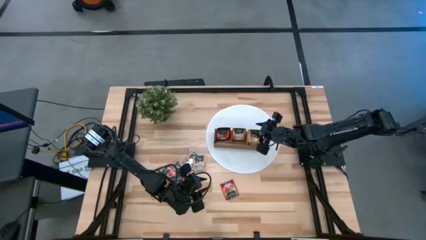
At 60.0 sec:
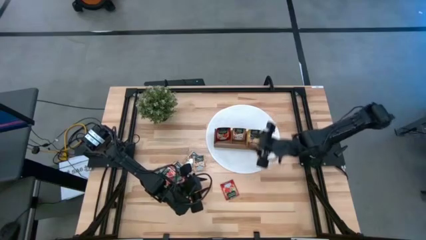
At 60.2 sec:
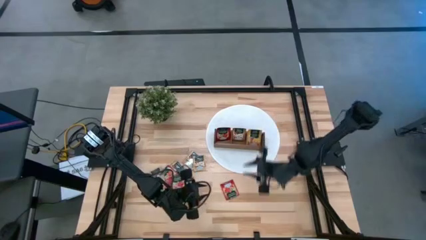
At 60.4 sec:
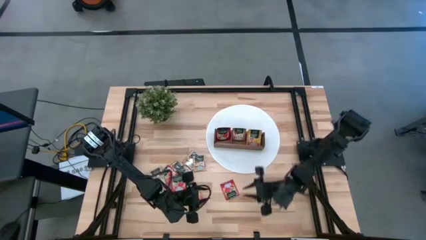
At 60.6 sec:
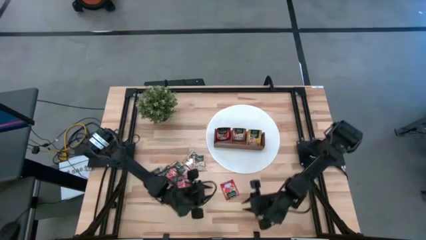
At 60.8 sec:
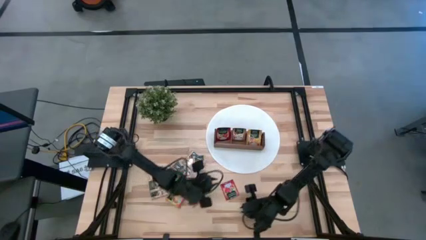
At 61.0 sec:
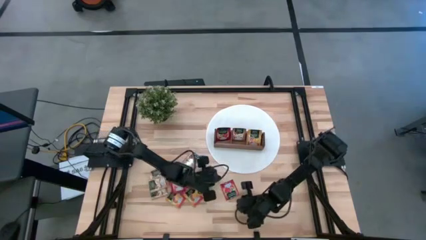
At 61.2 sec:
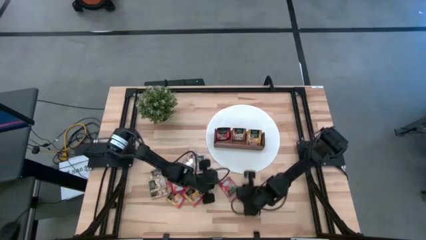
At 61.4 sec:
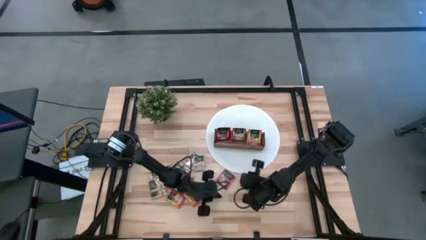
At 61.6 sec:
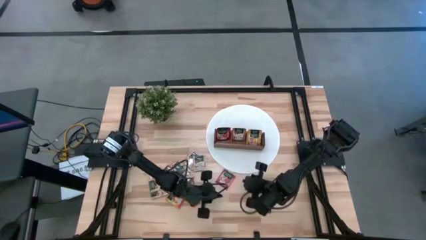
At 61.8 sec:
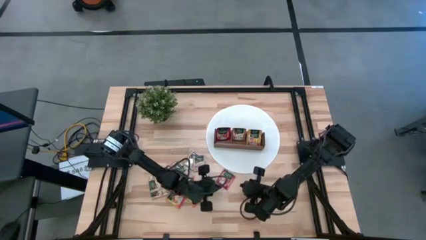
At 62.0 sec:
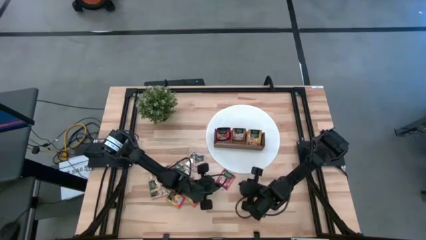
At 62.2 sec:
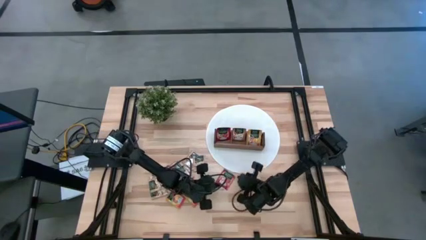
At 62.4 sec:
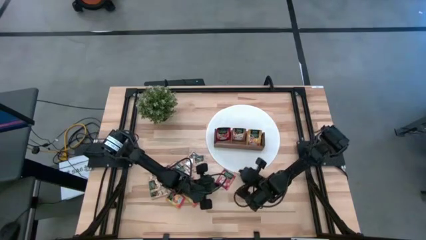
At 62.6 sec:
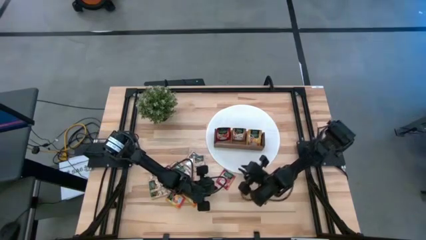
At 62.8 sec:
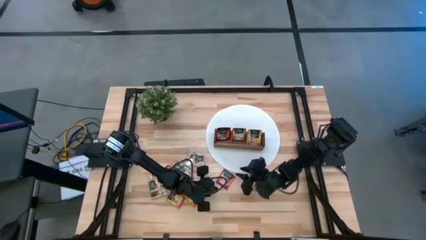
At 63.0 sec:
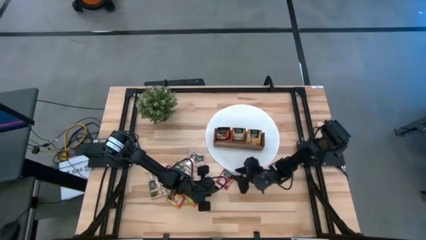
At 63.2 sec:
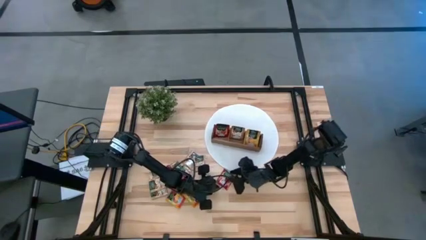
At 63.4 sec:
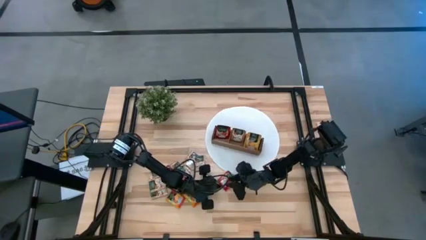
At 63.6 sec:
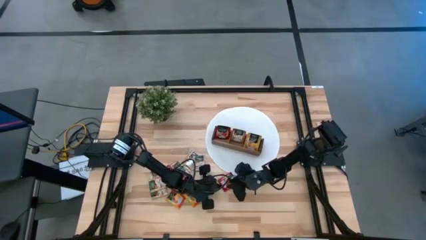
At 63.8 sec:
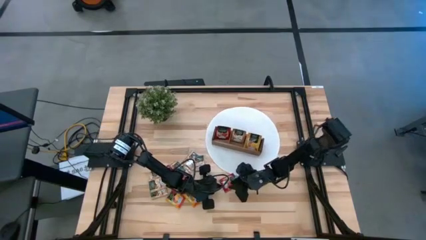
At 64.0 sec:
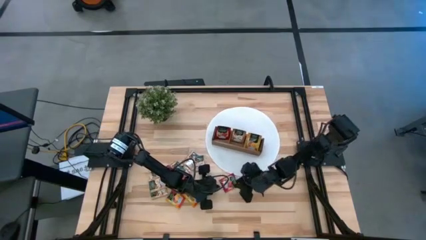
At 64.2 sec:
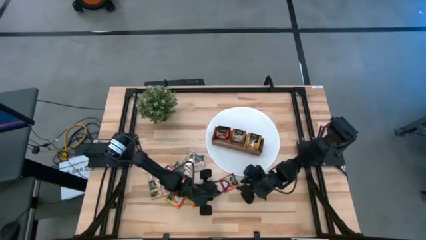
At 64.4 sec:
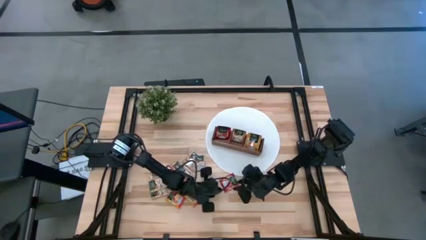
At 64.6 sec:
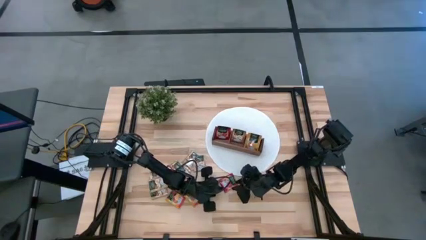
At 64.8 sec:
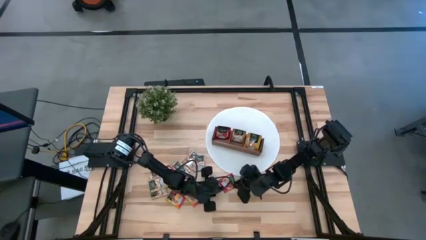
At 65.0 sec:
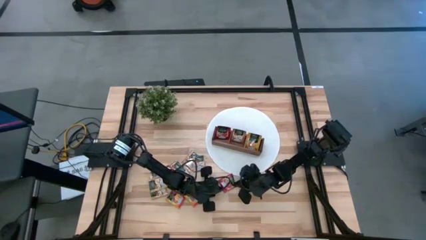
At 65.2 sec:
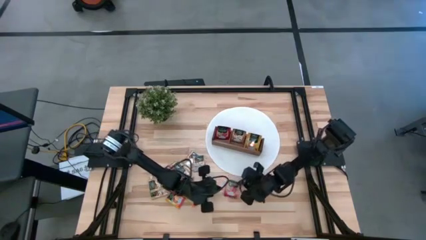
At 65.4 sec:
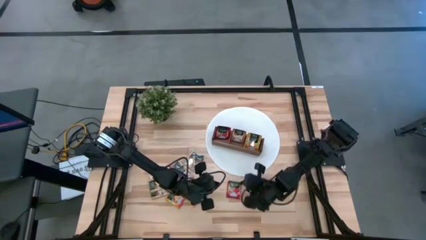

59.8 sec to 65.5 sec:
Task: Pick & Place Tea
Put the red tea bag into the left section of the wooden organizer

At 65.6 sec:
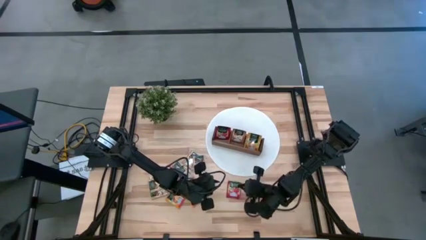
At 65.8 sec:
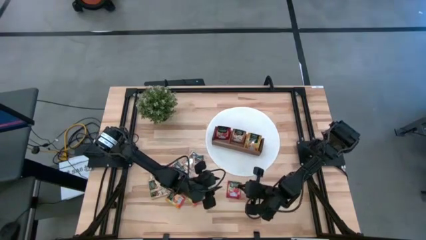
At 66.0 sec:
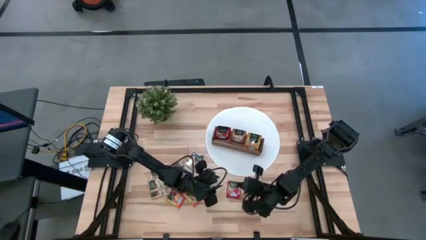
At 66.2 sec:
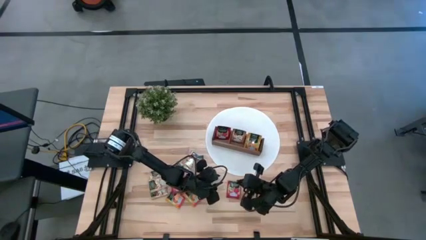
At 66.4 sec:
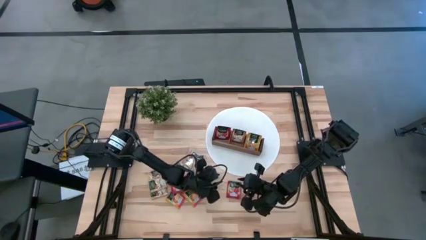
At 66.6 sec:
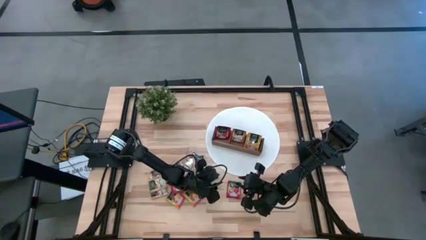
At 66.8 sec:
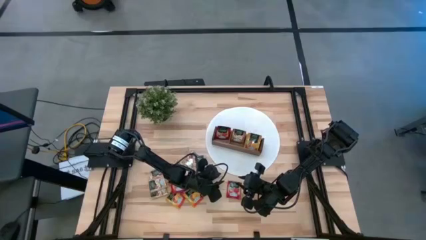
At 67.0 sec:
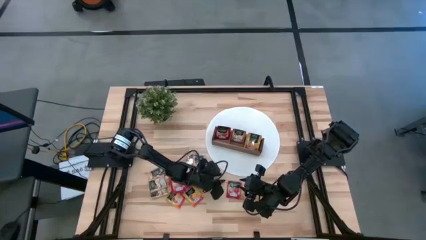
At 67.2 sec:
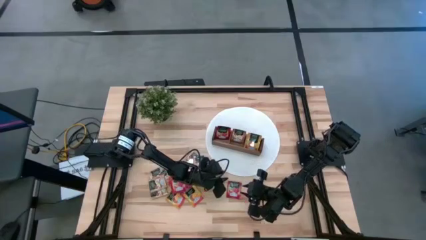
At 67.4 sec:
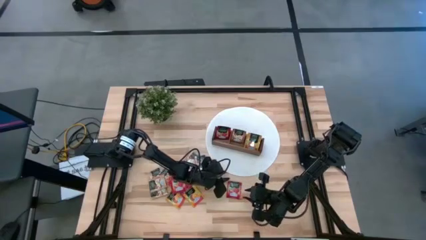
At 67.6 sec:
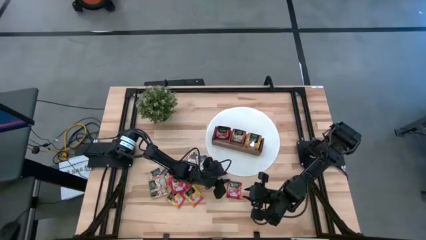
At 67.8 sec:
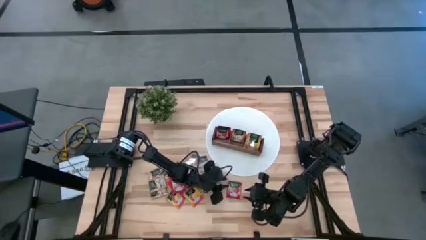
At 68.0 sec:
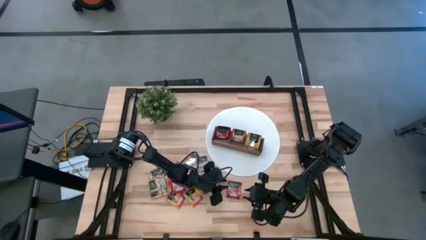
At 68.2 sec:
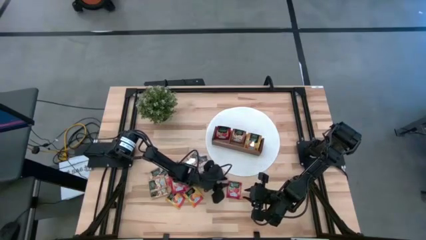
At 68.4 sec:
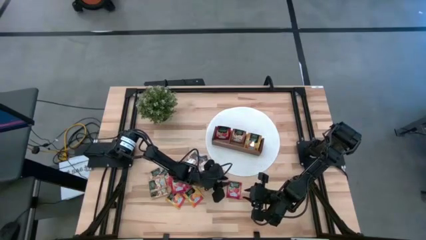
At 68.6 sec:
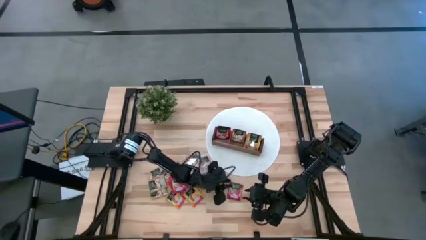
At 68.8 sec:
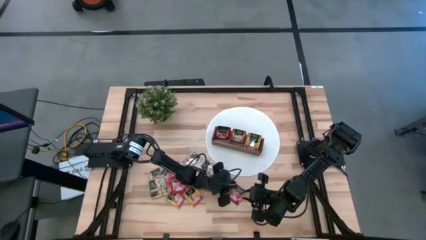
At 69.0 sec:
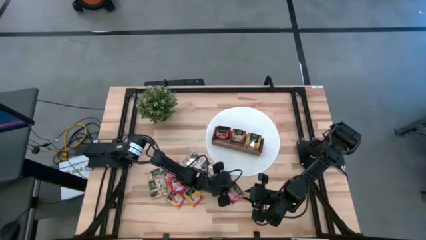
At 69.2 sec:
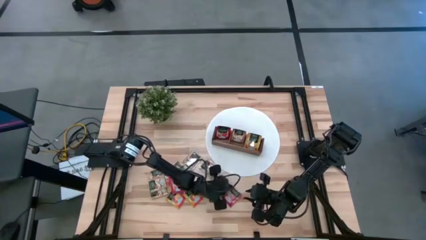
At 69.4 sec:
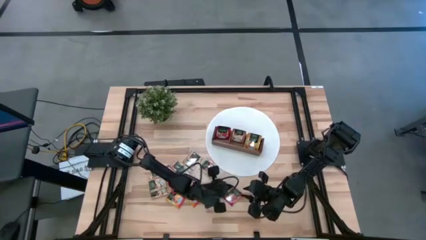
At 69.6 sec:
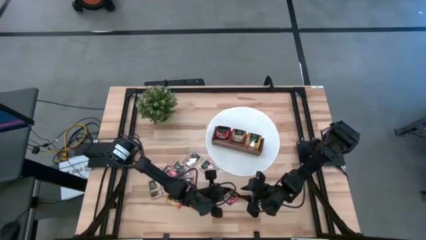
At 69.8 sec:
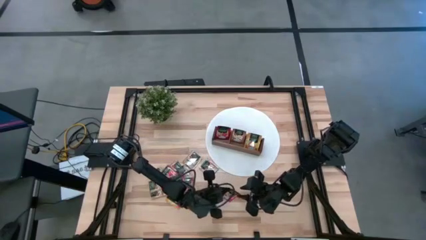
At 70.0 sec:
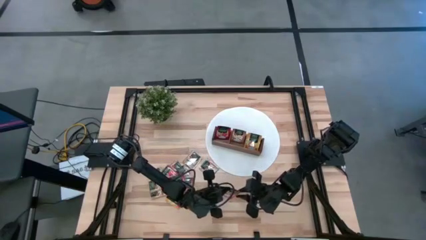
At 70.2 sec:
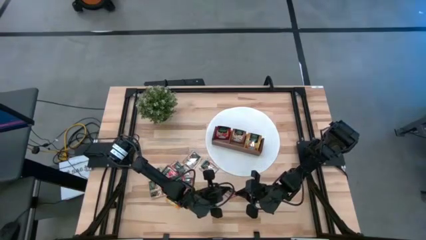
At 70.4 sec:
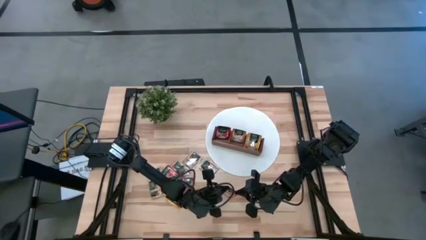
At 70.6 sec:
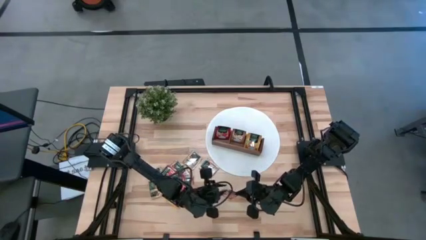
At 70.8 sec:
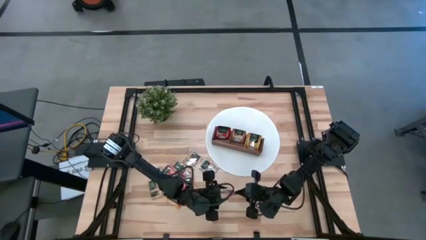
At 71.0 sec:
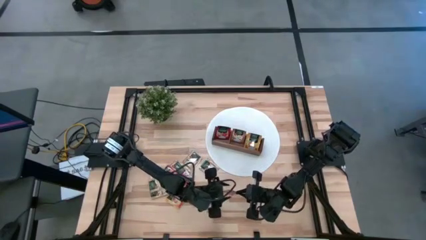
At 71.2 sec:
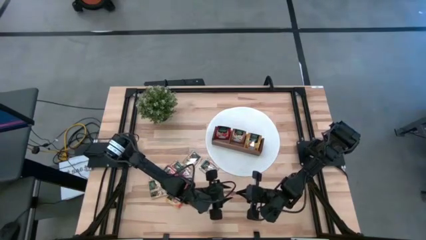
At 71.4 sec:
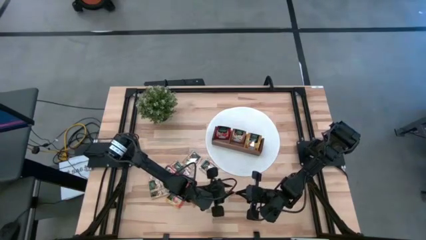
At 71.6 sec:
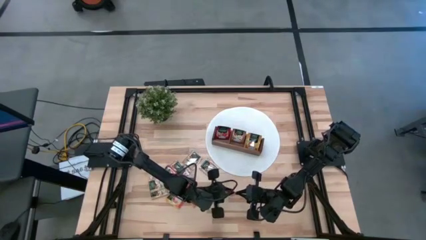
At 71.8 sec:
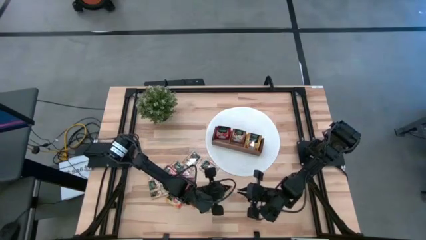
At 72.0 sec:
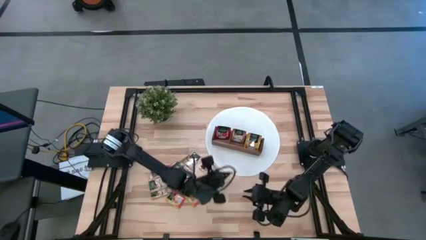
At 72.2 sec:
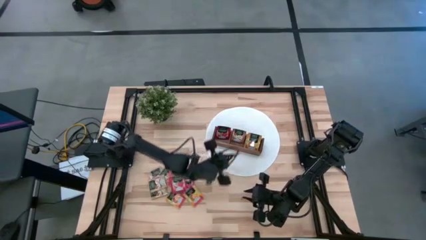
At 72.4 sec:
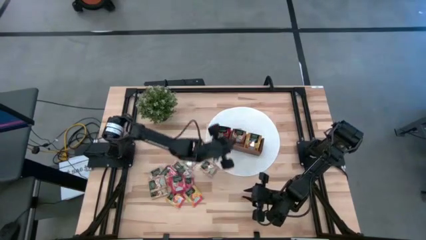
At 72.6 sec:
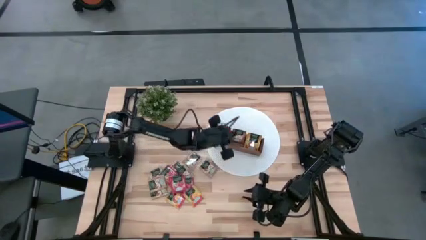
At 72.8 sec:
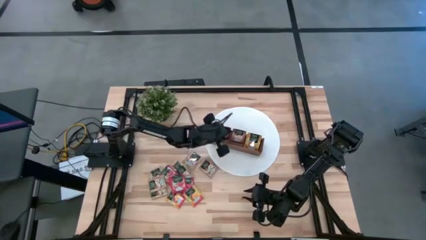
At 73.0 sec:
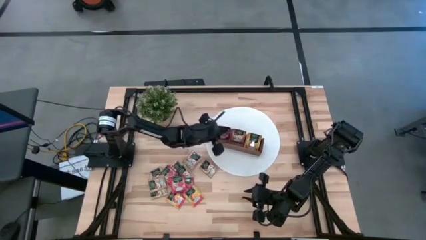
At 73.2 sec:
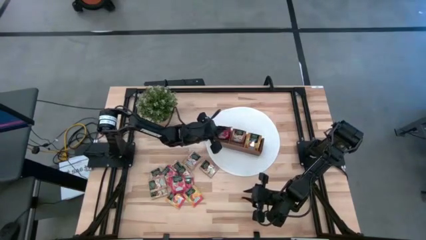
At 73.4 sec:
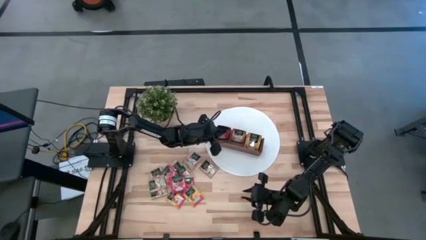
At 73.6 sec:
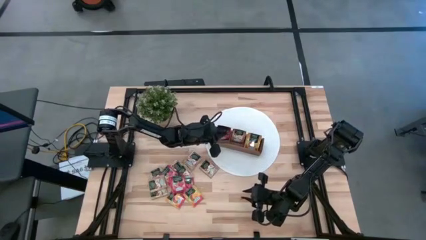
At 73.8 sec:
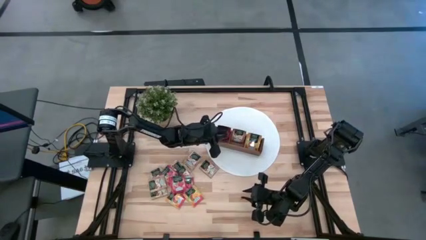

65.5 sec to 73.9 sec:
Put the red tea bag into the left section of the wooden organizer

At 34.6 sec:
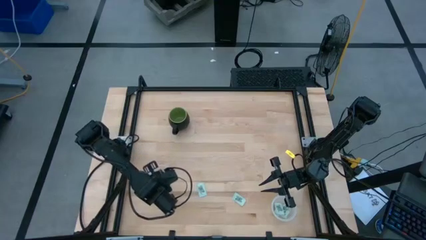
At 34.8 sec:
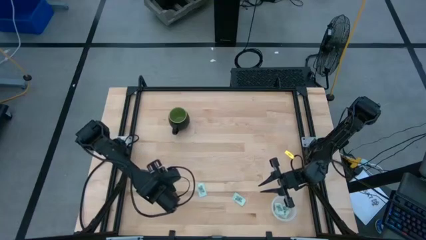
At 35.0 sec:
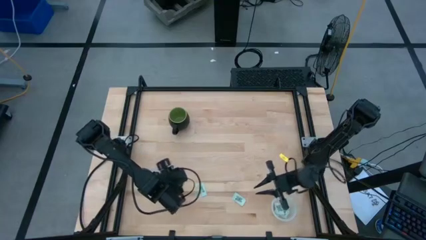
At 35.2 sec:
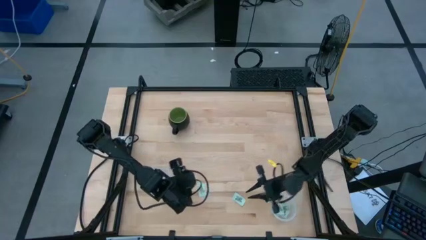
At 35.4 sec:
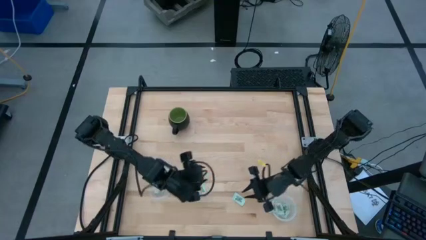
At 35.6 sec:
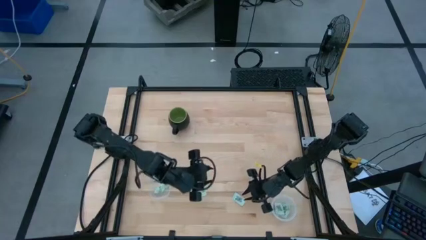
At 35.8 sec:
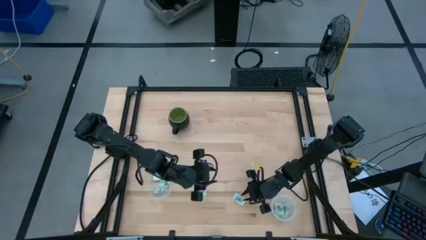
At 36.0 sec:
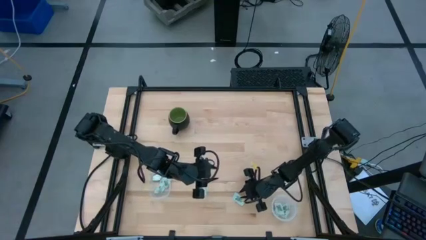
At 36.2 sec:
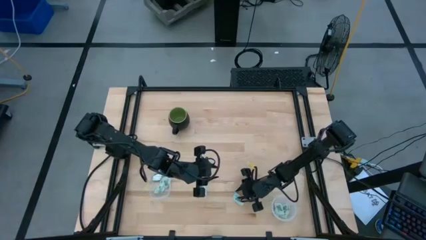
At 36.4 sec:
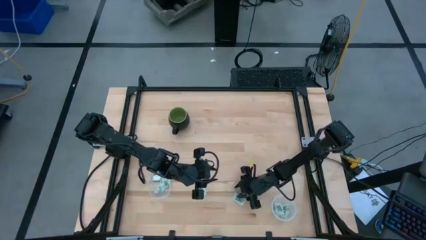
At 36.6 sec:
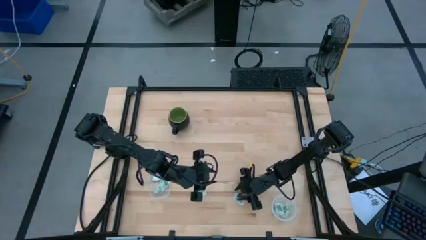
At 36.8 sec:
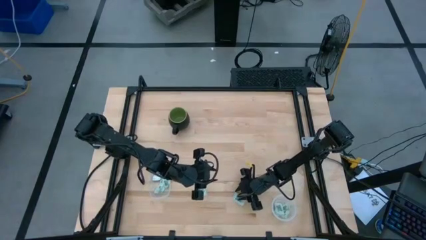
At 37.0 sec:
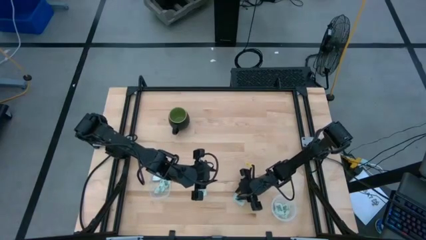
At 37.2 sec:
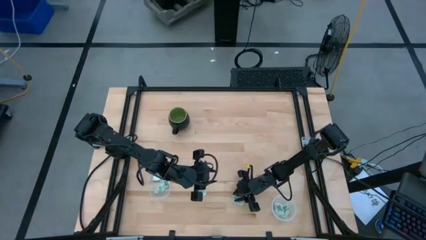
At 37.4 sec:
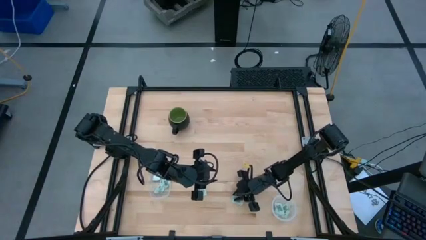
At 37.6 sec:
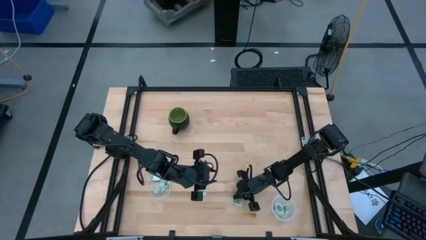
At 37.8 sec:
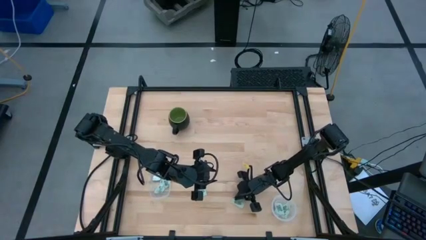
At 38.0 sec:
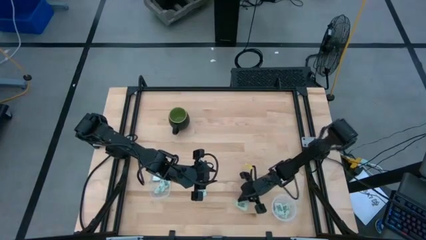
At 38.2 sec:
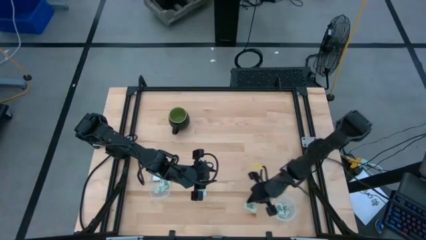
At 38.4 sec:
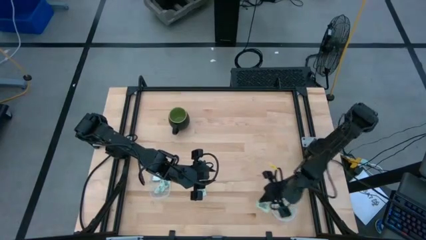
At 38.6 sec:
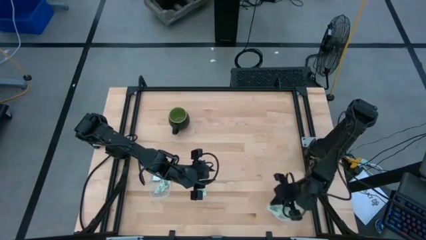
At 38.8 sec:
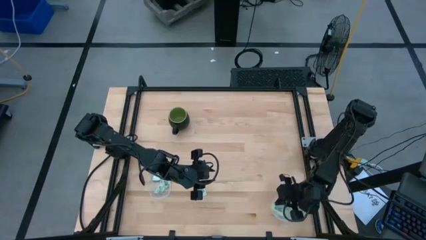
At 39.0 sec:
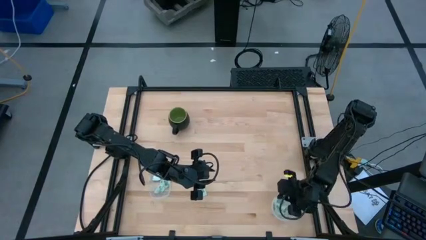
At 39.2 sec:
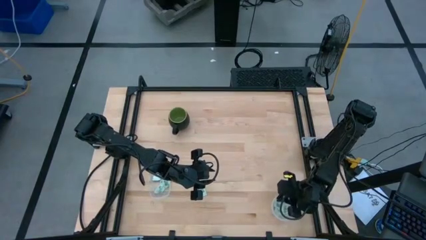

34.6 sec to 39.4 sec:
Task: Pick and place Stevia / Truvia into bins
Put the right Stevia packet into the bottom right transparent container
